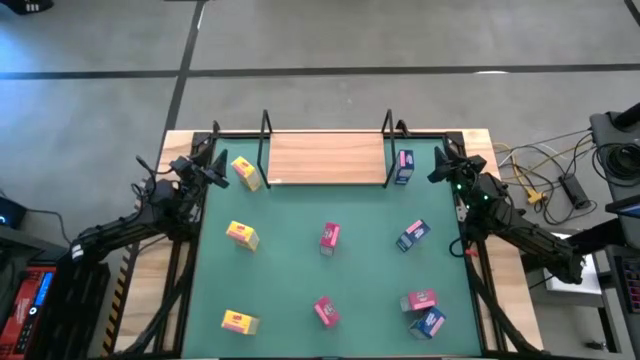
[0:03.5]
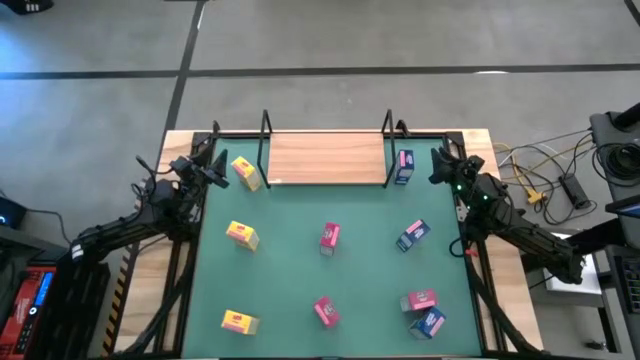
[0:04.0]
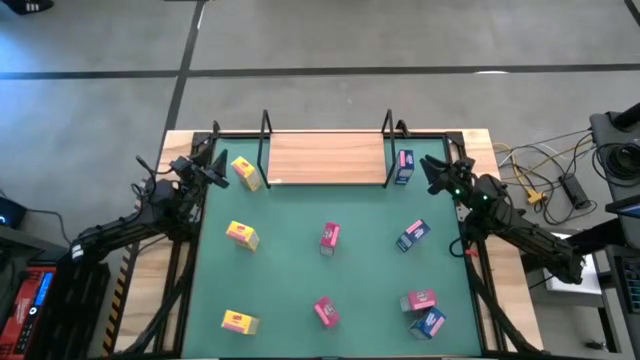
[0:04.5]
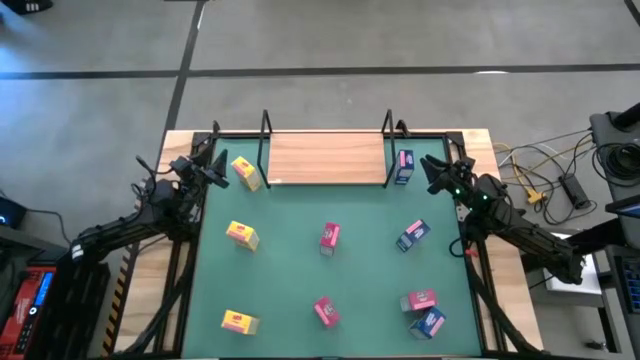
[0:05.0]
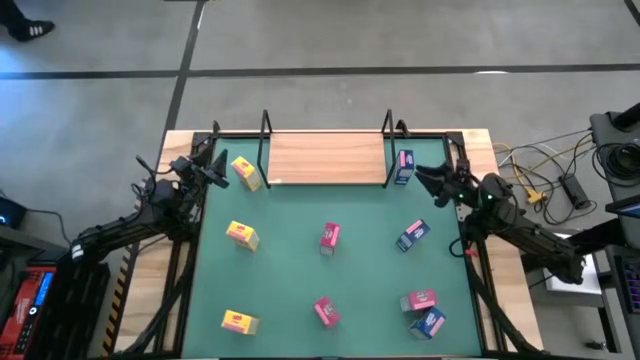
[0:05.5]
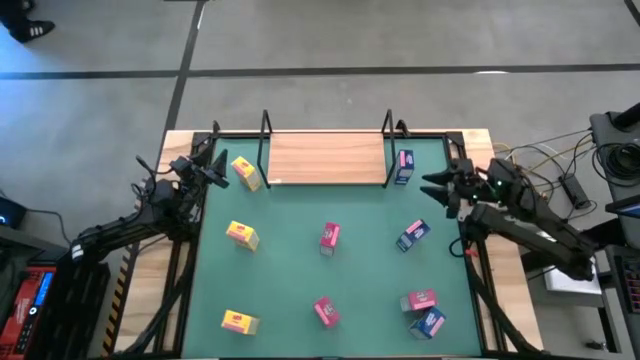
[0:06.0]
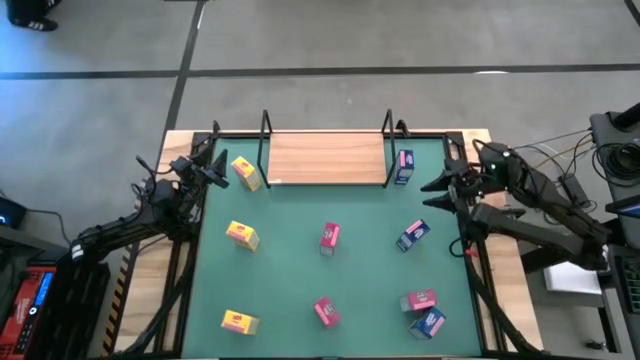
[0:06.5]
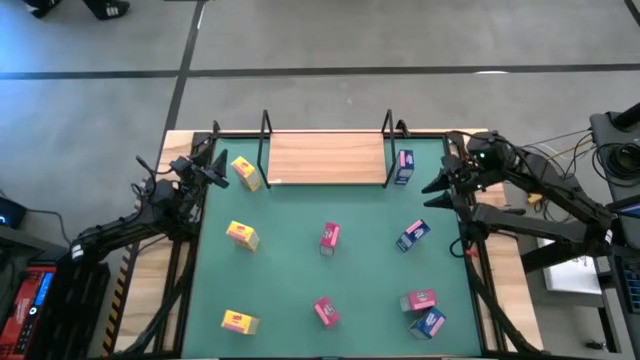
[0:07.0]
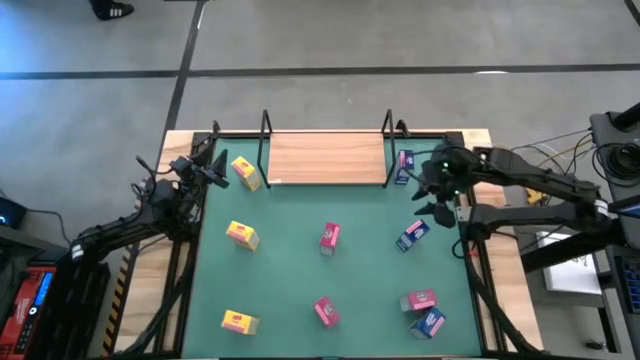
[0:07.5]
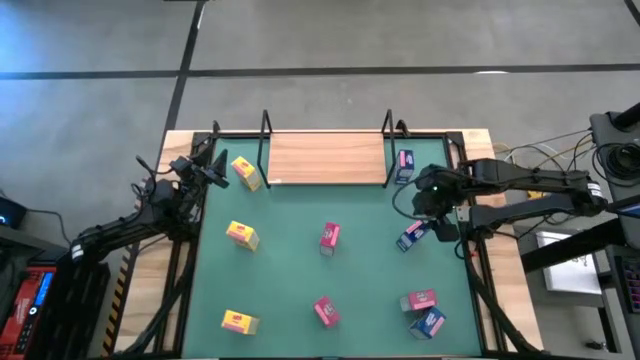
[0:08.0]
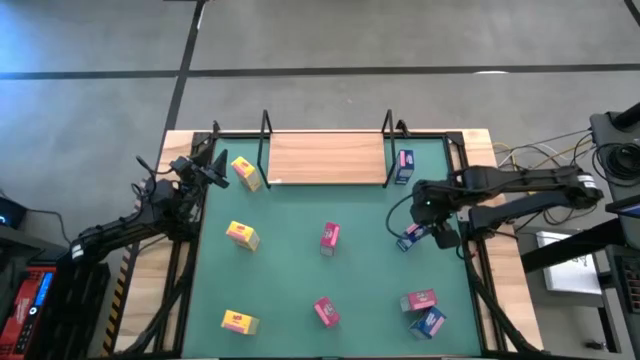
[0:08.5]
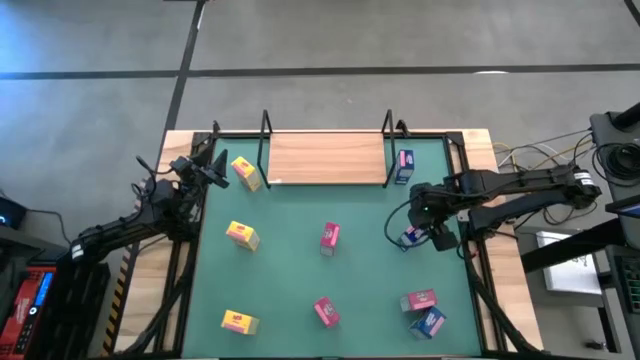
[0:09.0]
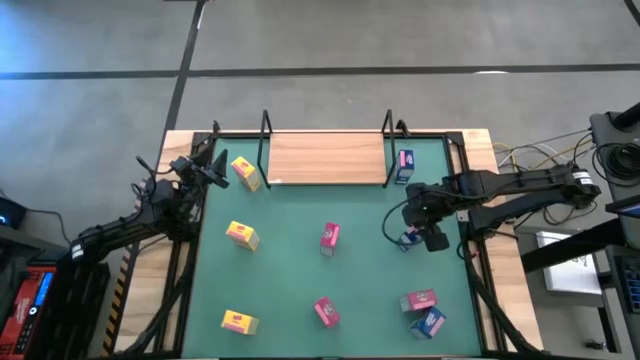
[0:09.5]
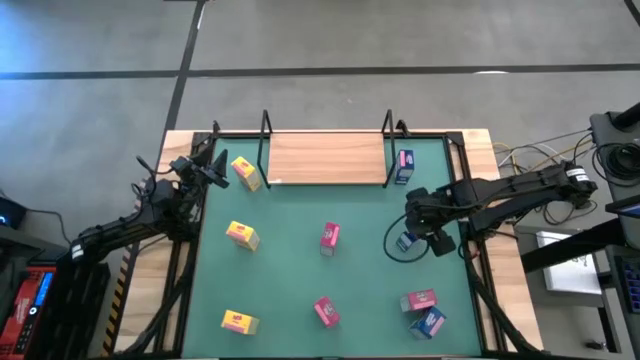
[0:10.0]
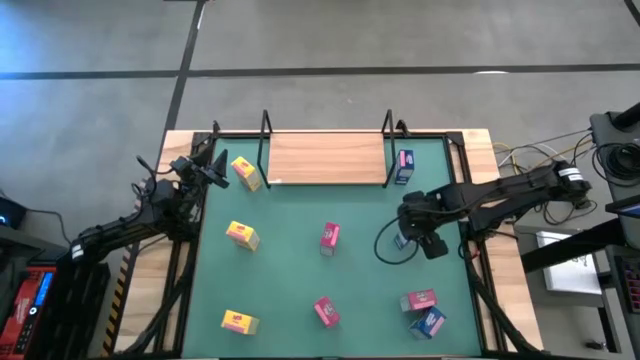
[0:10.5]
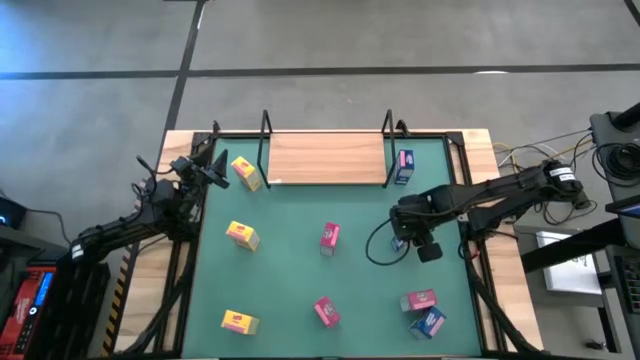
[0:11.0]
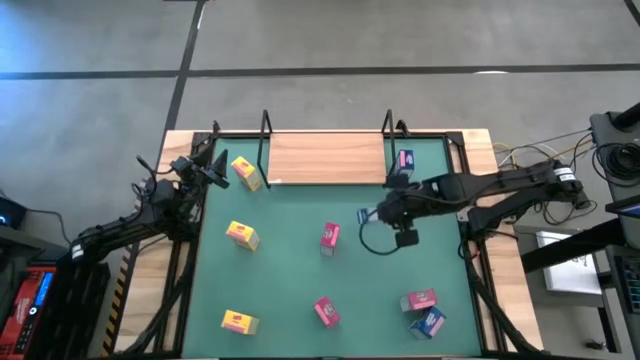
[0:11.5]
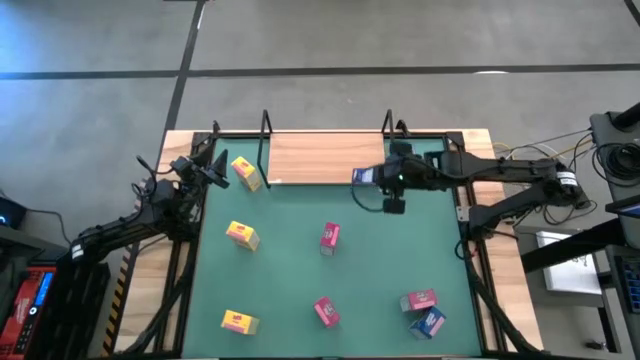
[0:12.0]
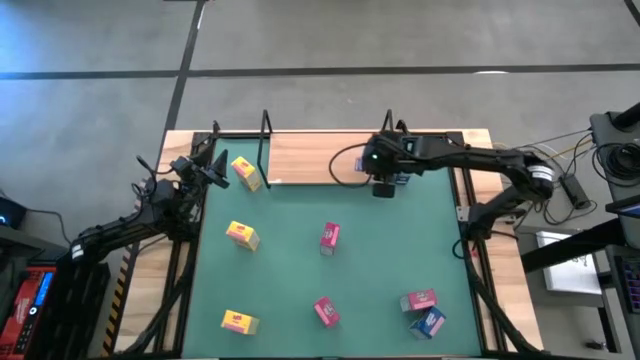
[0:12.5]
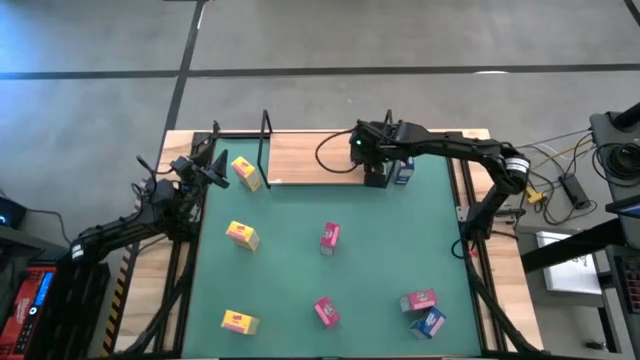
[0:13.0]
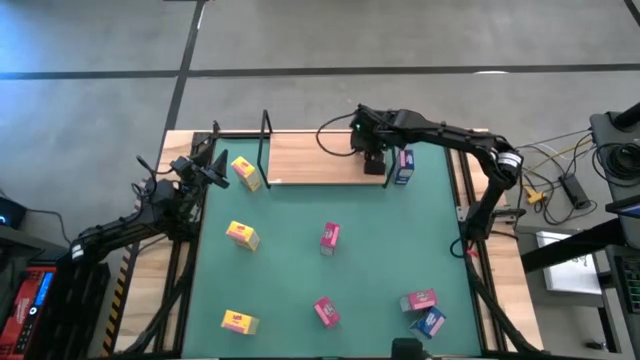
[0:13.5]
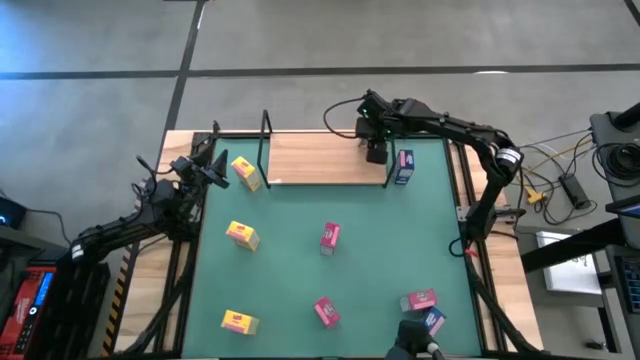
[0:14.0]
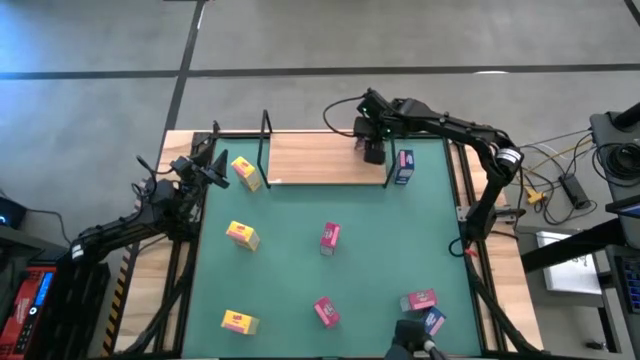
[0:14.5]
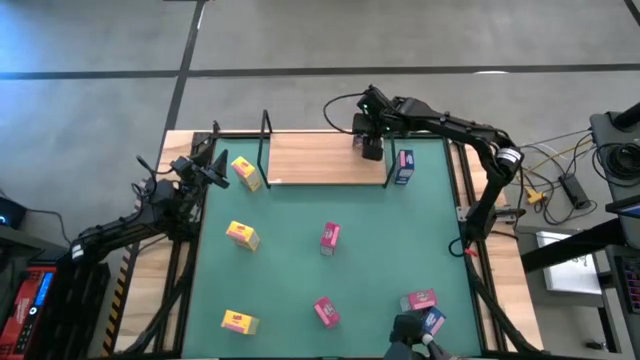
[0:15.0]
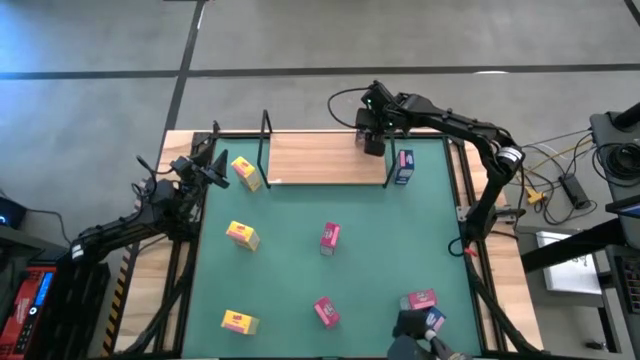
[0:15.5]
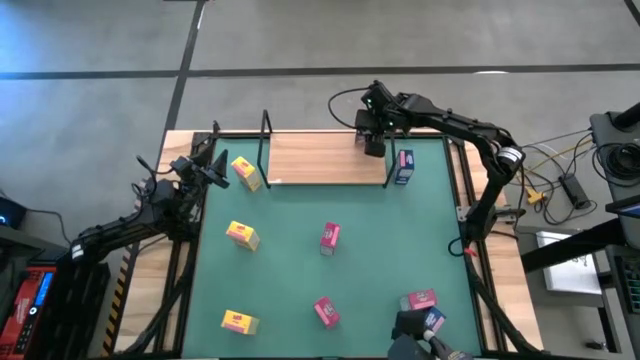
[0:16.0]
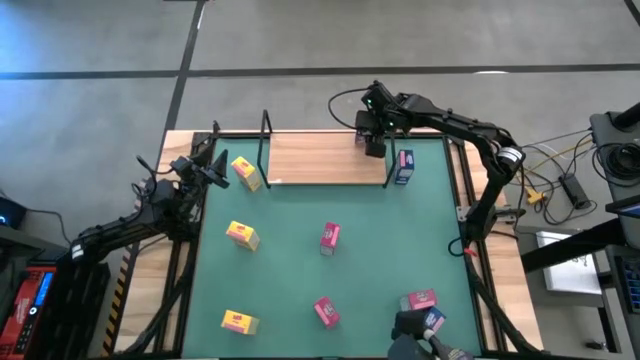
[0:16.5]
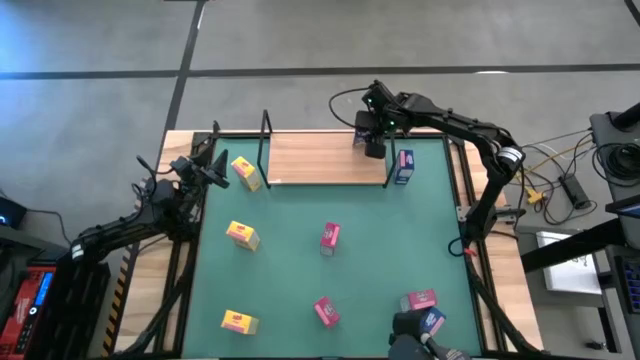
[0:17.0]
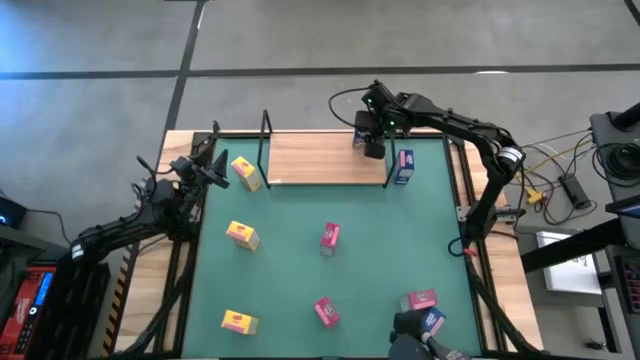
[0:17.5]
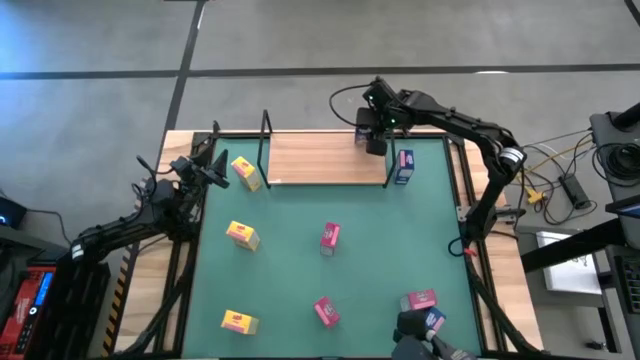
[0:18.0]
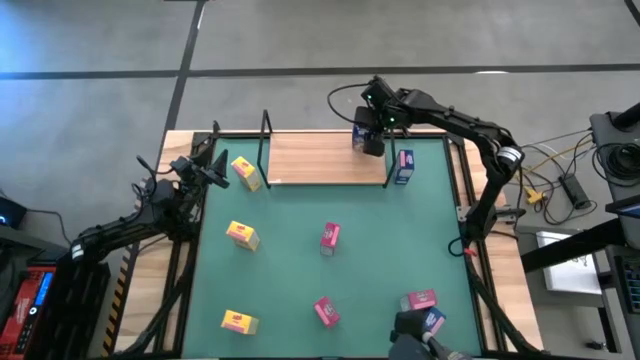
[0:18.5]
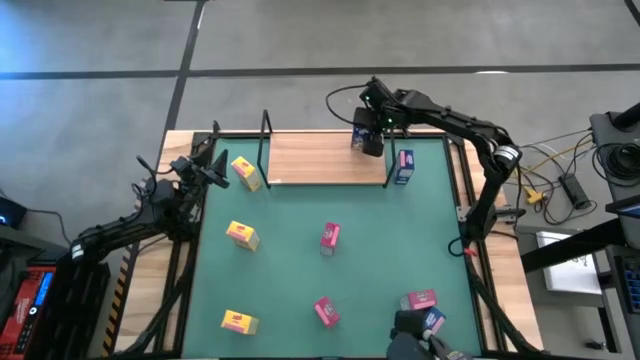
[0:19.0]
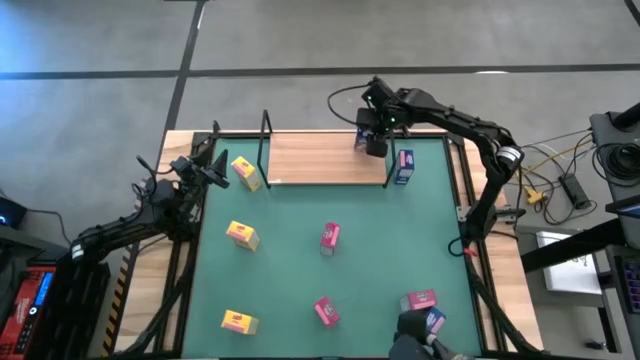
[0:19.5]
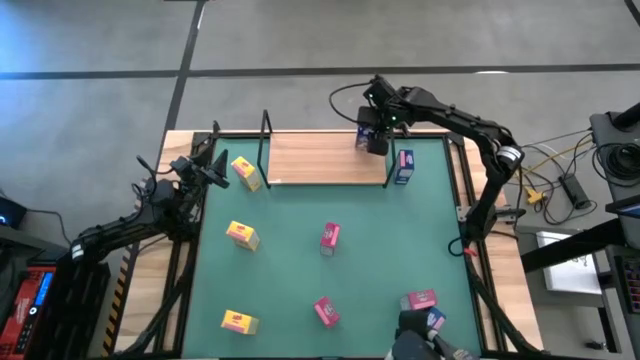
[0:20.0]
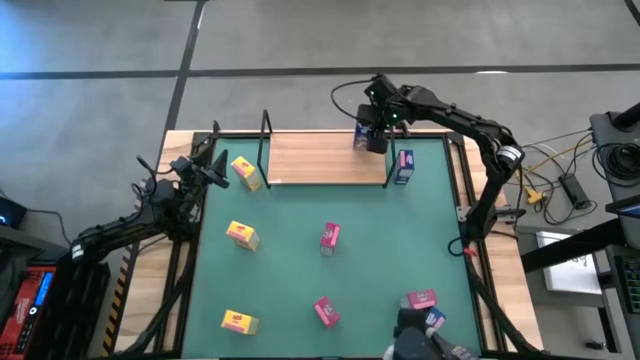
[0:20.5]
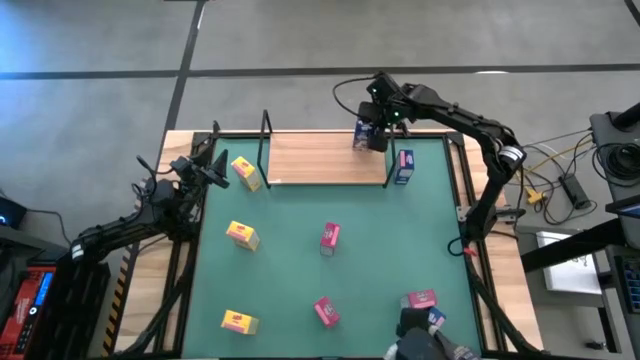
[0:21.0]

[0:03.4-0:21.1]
Task: Stack cereal on shelf
Put the middle blue cereal box on the shelf

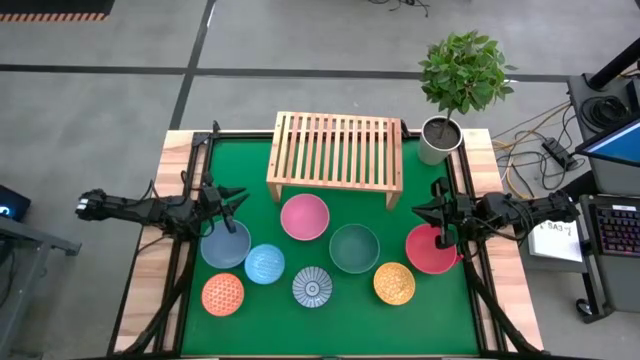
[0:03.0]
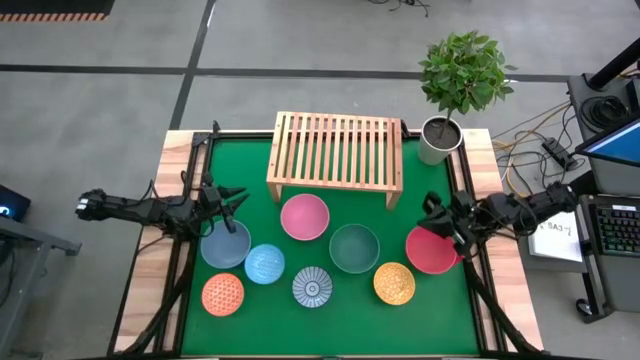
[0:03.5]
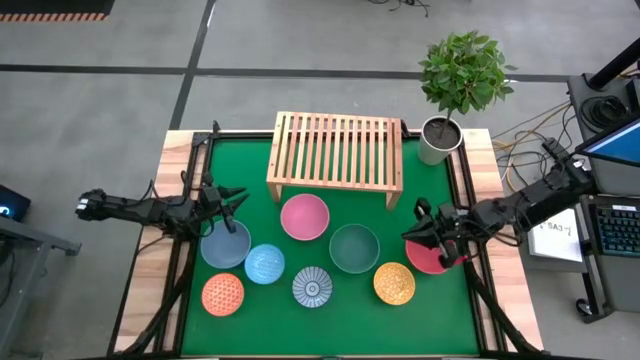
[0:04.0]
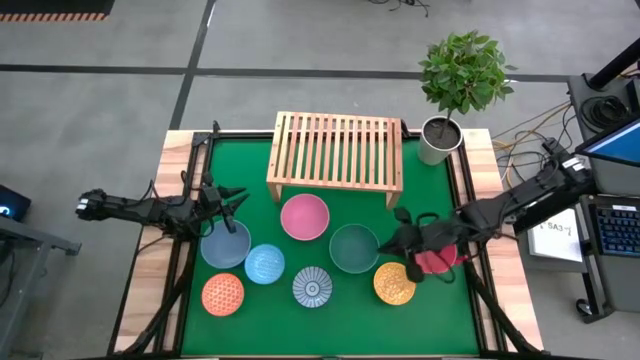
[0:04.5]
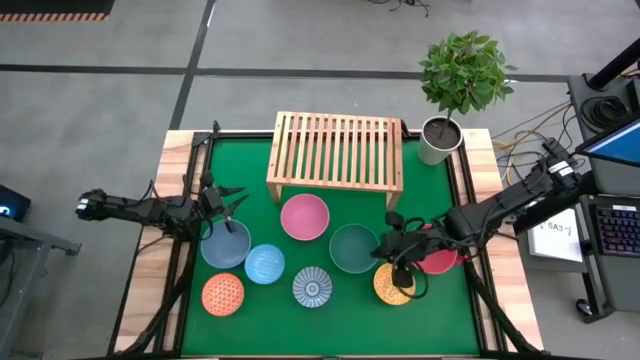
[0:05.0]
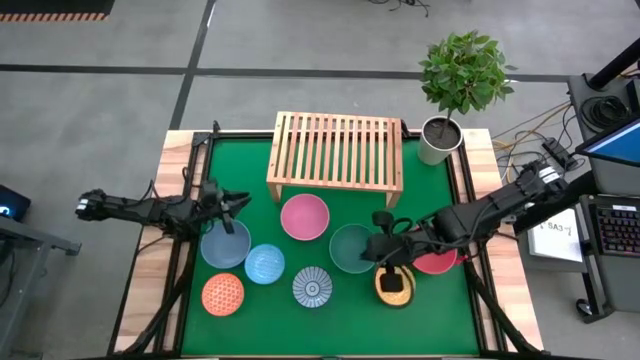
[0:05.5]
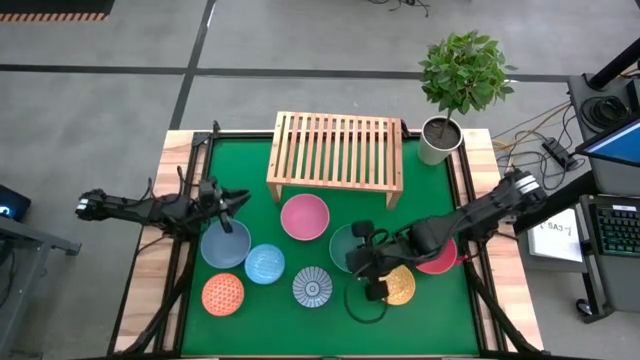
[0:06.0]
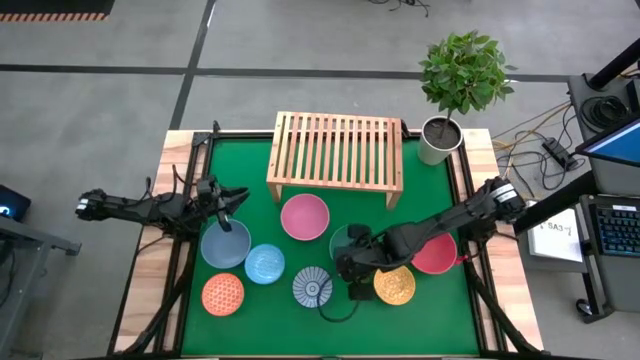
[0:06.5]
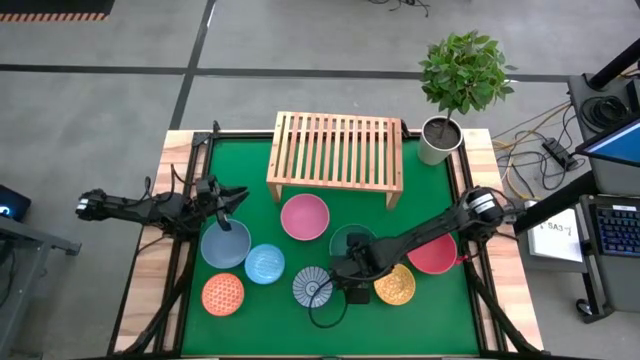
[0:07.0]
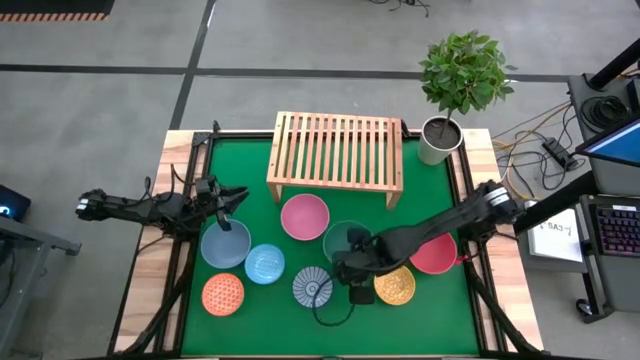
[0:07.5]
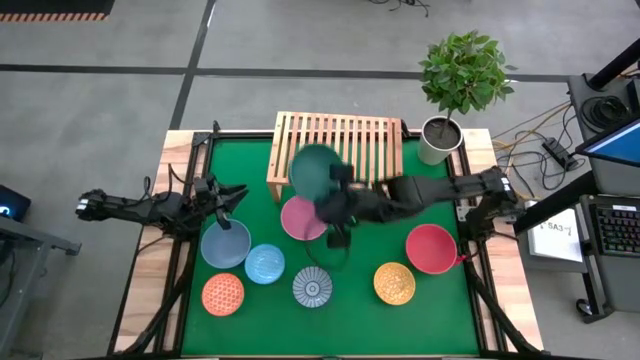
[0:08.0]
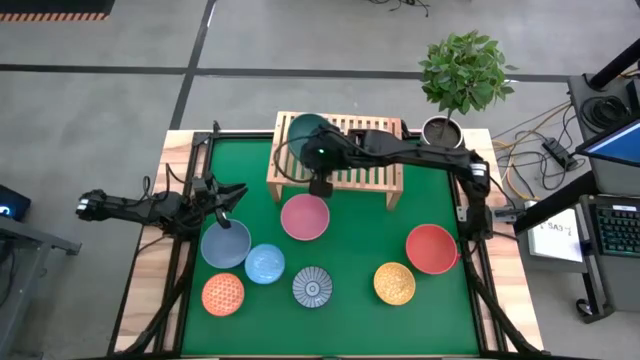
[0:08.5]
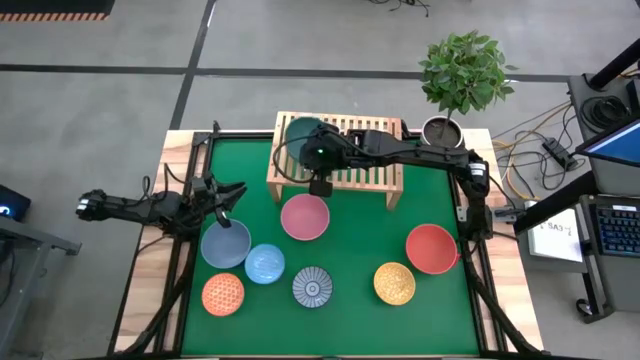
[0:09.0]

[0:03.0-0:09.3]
Task: Place and stack bowls onto a shelf
Put the green bowl on the shelf
